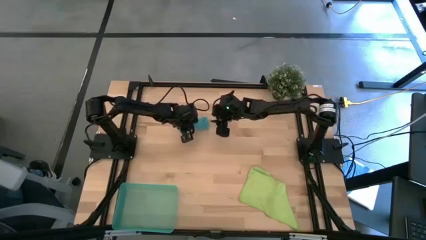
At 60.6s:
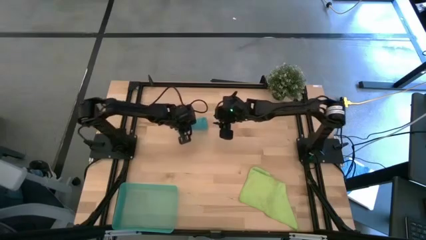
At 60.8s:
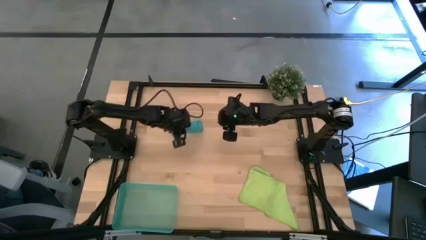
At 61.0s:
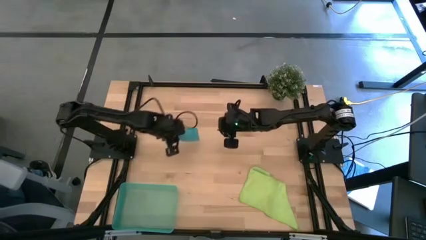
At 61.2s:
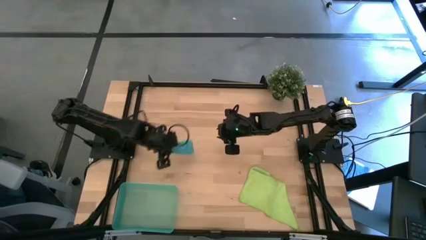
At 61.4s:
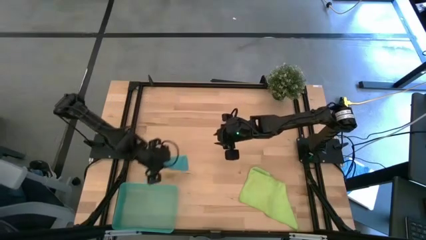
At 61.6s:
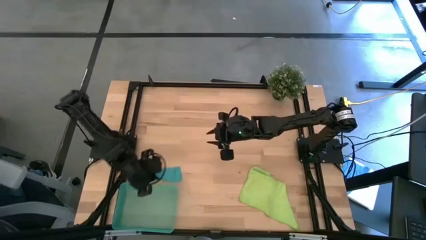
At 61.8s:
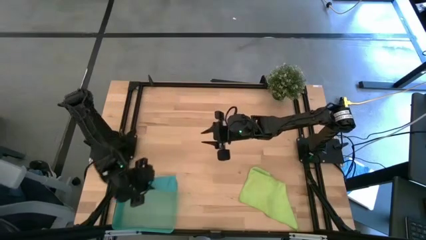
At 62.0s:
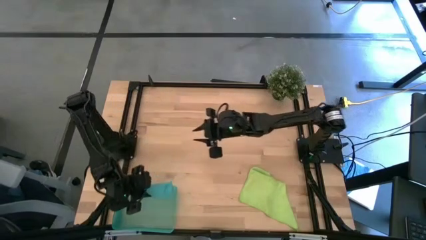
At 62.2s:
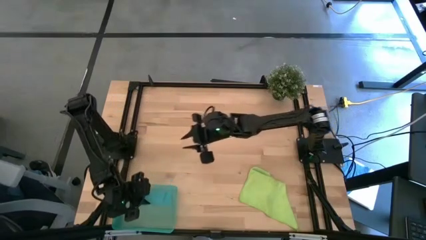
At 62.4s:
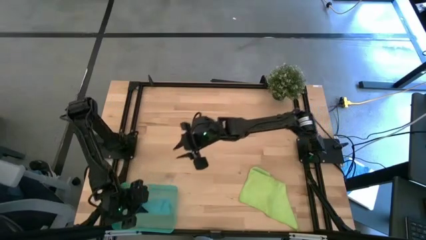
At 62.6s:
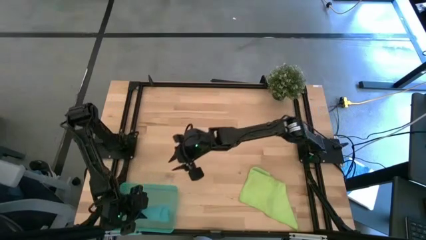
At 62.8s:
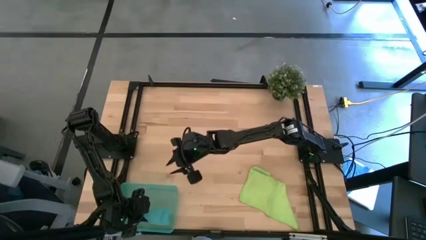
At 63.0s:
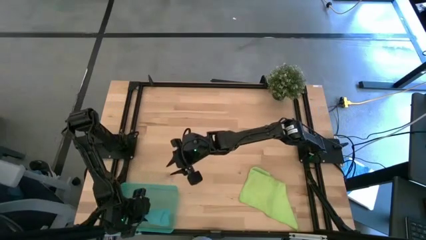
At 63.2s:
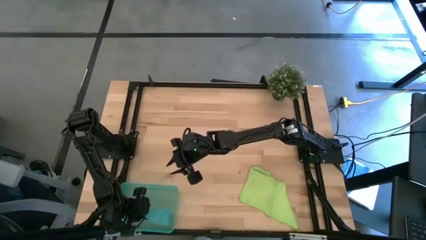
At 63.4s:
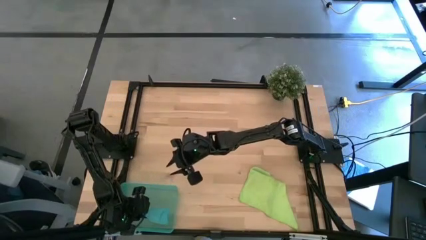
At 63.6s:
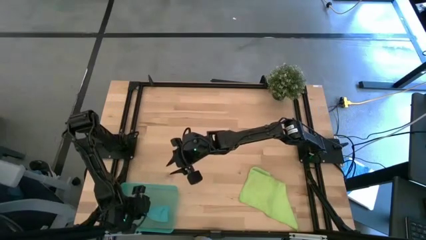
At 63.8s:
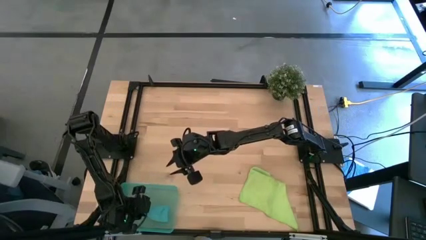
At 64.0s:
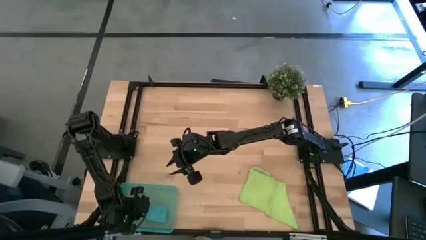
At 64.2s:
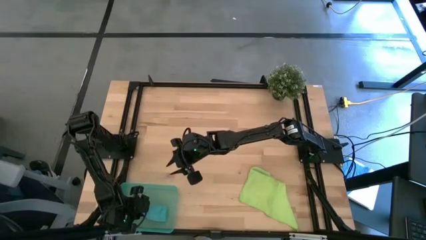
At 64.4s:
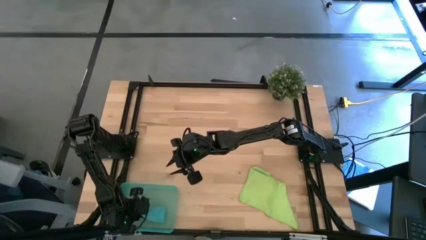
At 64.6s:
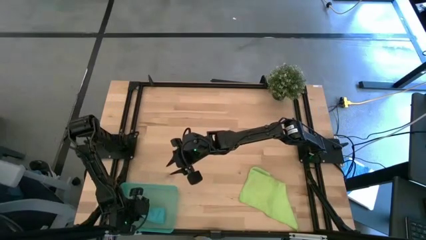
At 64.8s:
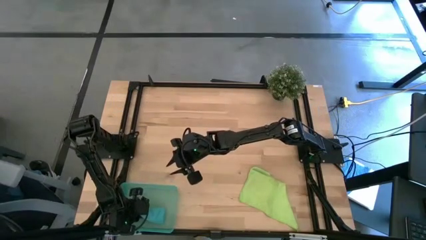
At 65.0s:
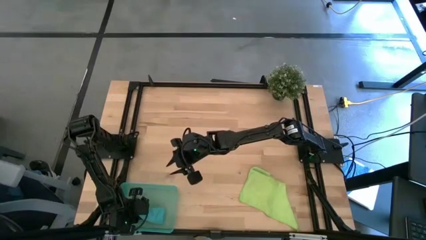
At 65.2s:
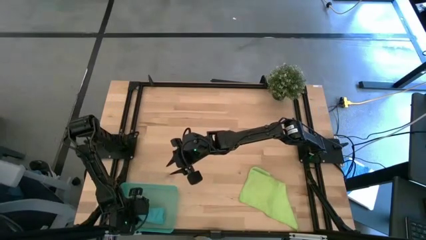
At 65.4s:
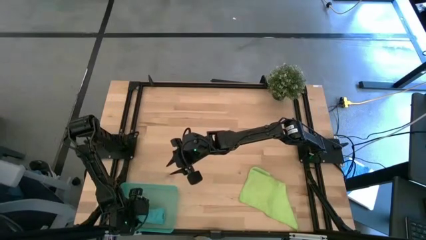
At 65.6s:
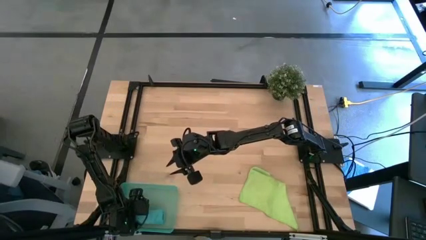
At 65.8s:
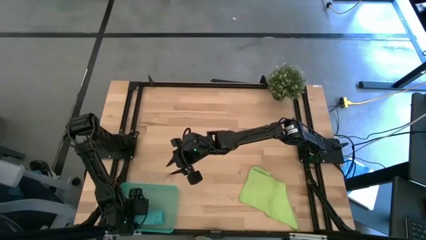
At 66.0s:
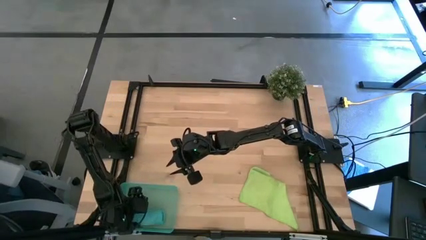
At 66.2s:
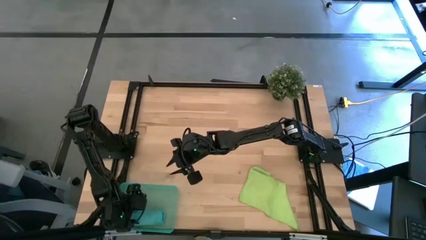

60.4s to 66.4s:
Task: Roll microfiber towels into tight, uniform cylinder then place into a basket
Put the rolled teal blue microfiber towel into the bin

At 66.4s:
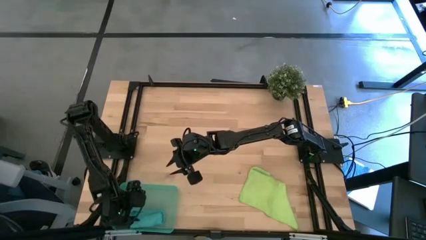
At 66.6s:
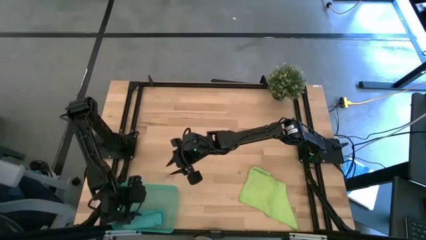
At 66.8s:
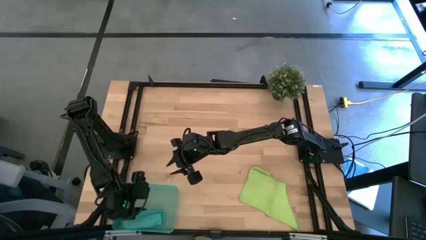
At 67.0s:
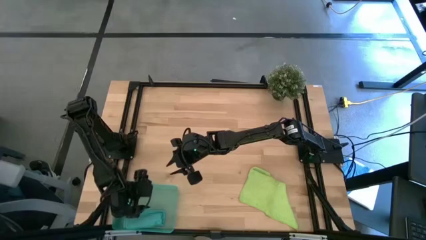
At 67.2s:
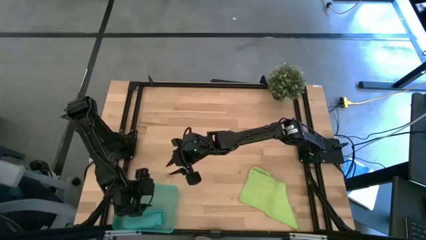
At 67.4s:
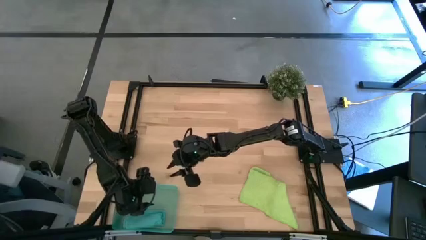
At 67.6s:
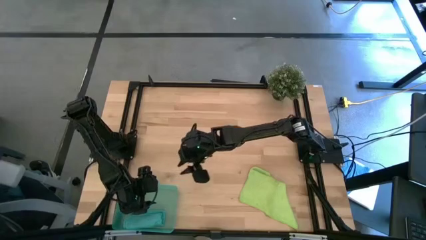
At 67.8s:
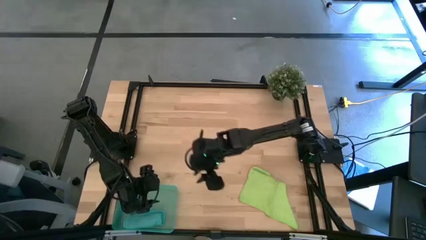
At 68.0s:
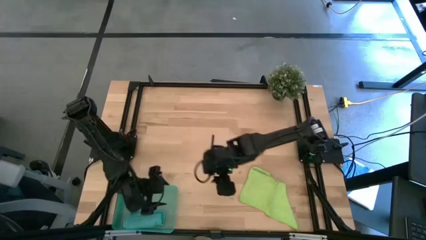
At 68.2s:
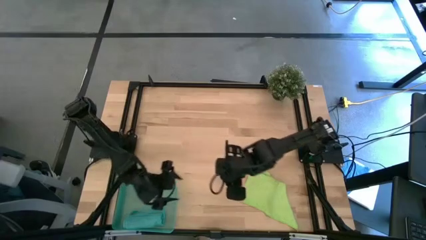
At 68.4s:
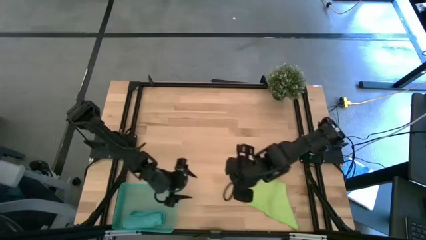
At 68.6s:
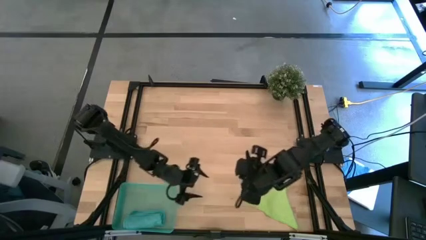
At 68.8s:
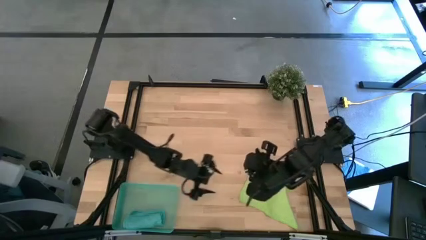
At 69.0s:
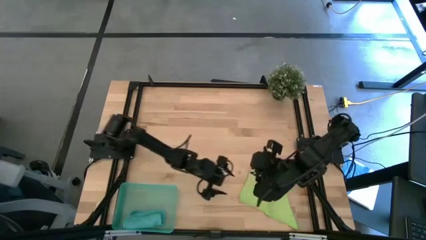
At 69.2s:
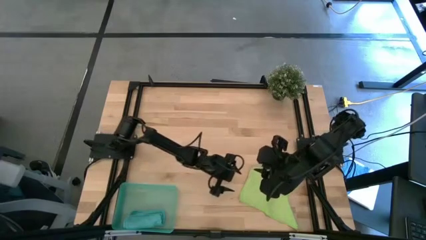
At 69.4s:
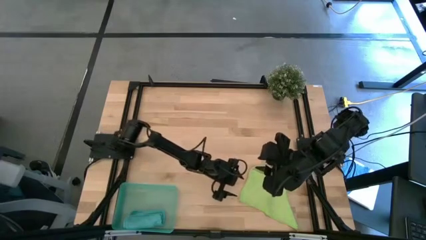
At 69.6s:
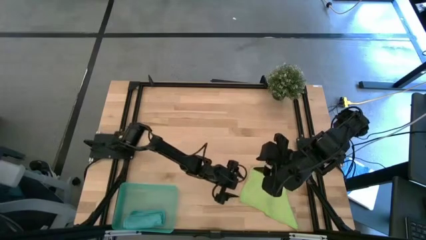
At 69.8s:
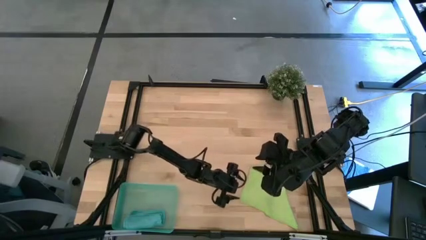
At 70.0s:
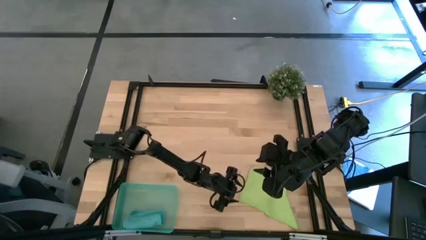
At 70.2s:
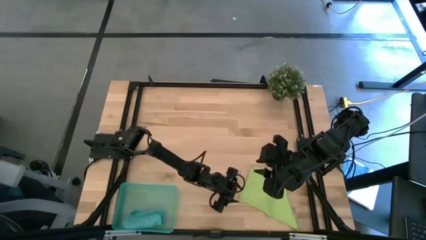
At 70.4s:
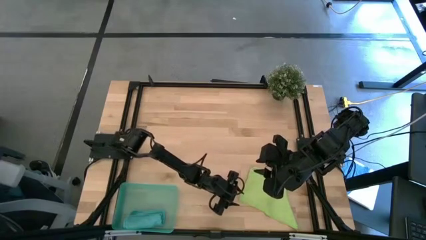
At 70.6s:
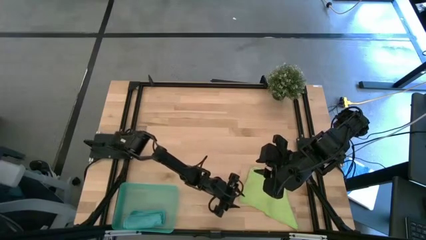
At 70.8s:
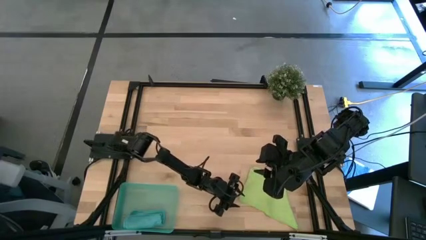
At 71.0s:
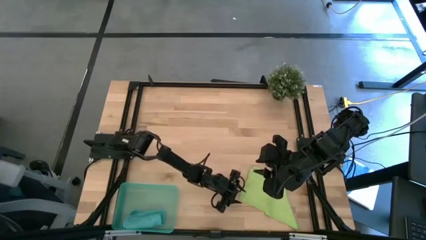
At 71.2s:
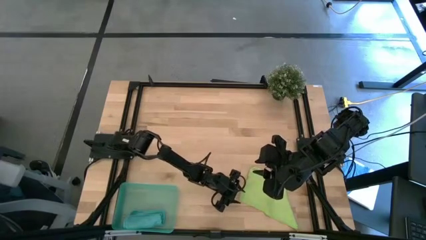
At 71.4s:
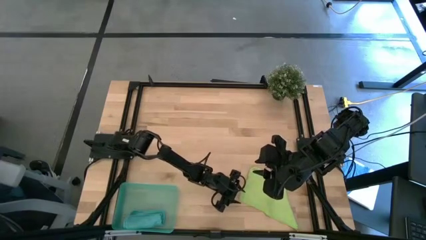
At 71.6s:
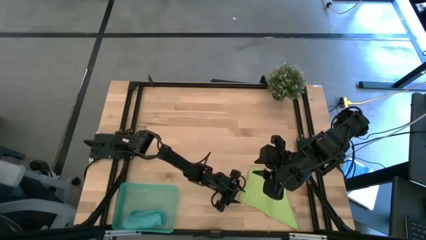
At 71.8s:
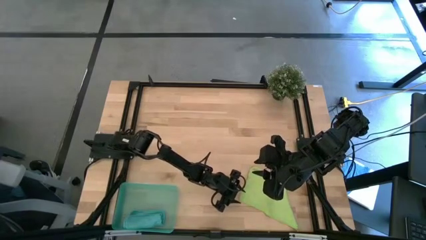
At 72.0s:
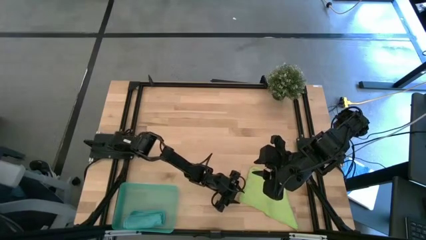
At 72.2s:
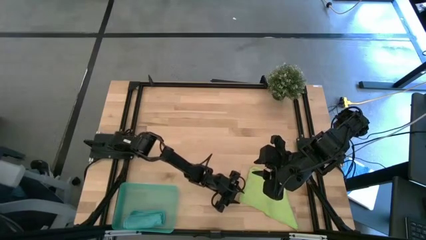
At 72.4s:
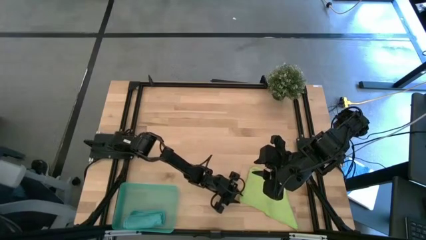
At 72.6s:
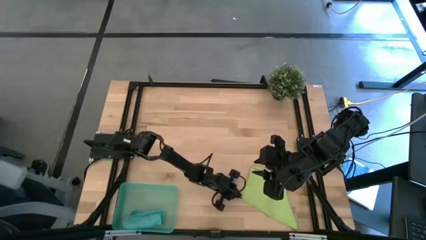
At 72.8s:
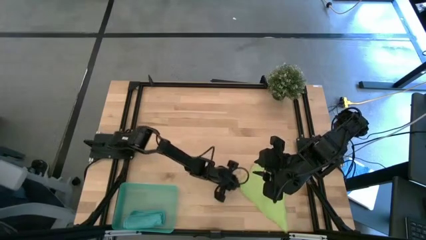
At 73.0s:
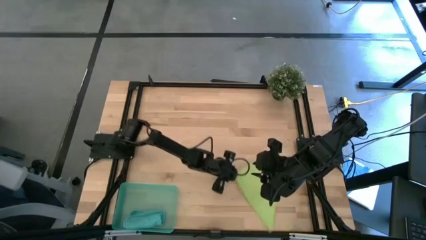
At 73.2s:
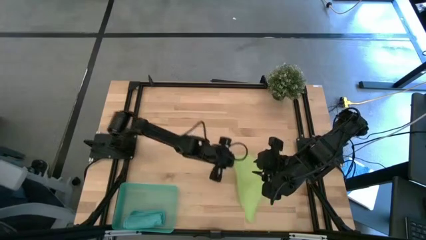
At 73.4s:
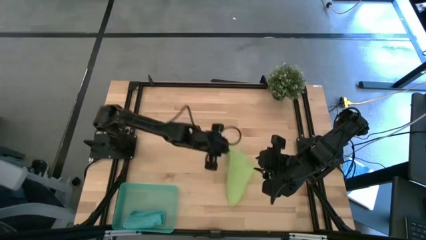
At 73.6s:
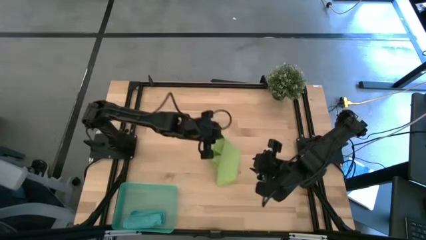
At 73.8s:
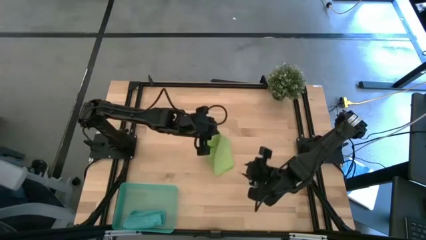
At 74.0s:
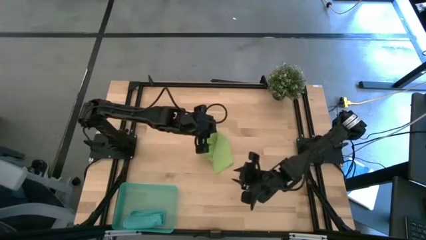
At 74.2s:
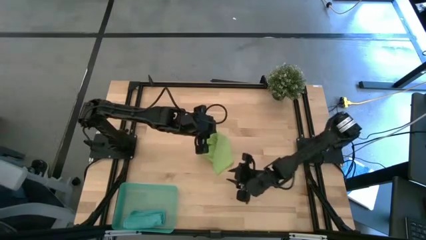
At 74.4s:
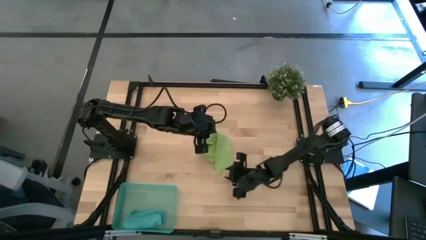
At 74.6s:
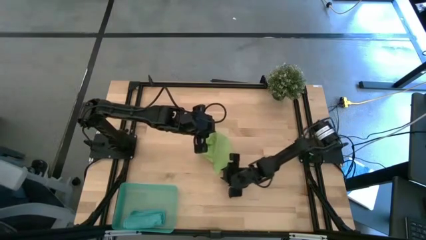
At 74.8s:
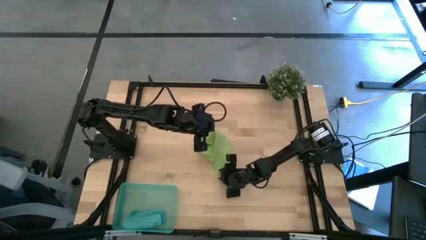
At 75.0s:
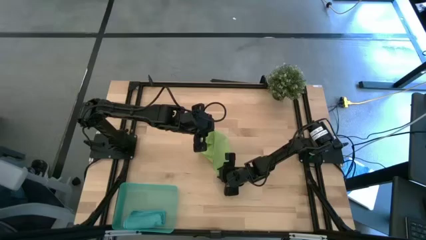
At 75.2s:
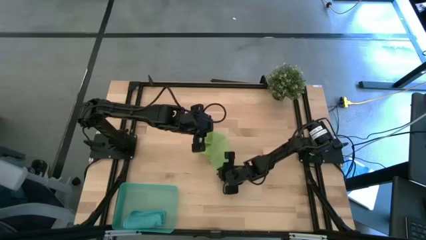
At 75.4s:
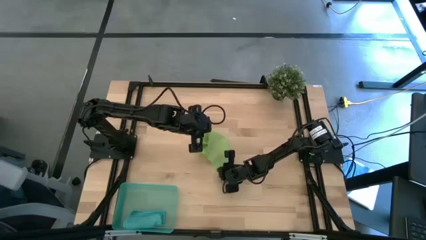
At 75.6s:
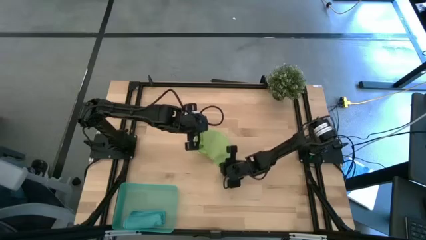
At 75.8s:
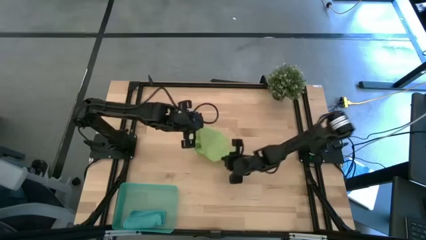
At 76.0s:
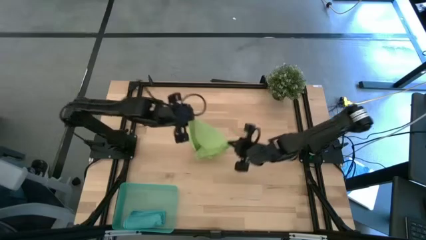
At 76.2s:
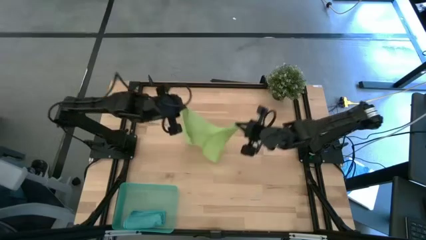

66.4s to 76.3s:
Fold the yellow green microfiber towel
